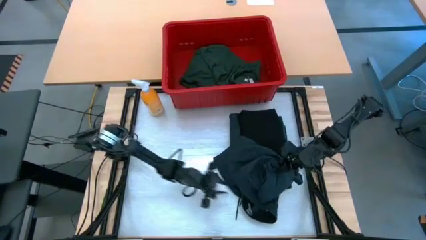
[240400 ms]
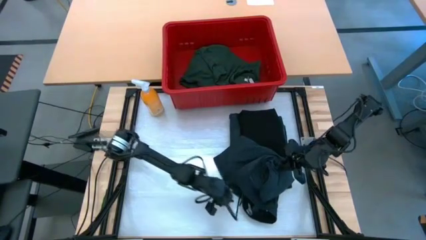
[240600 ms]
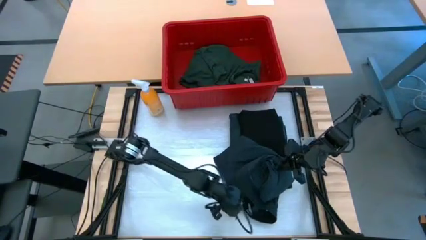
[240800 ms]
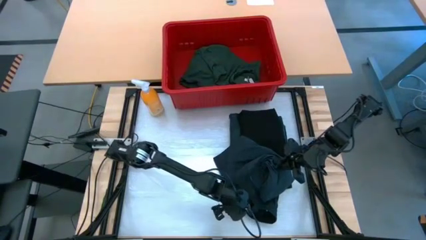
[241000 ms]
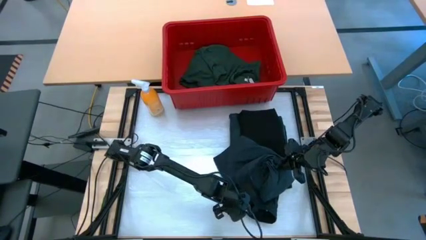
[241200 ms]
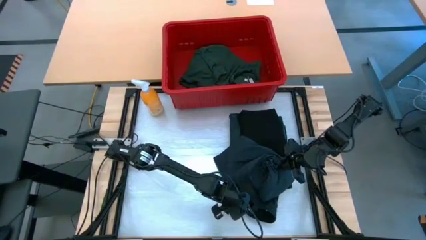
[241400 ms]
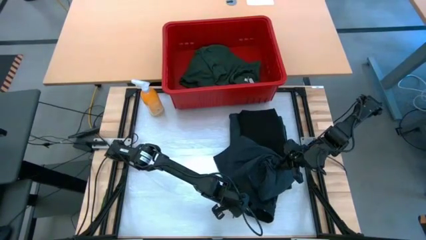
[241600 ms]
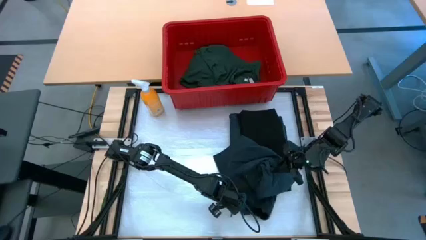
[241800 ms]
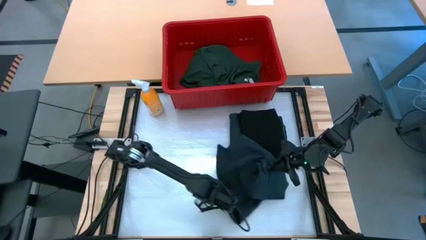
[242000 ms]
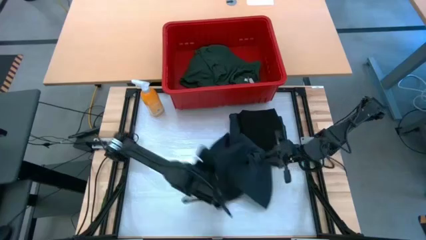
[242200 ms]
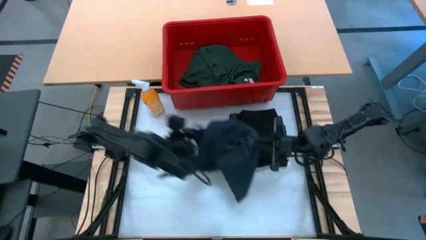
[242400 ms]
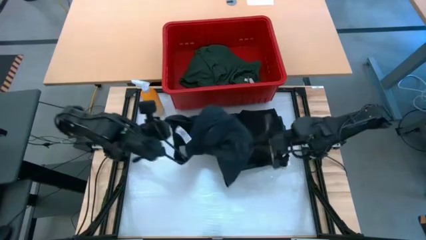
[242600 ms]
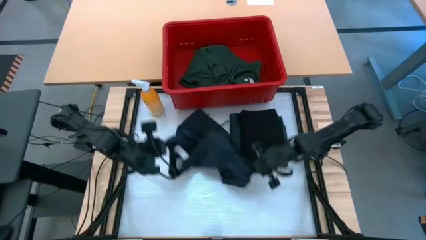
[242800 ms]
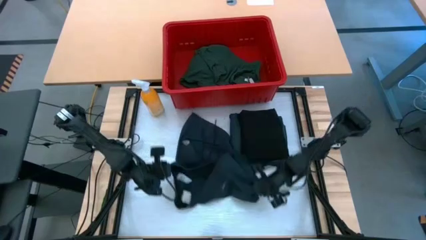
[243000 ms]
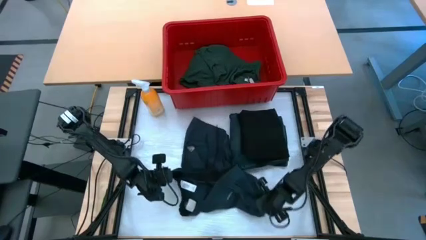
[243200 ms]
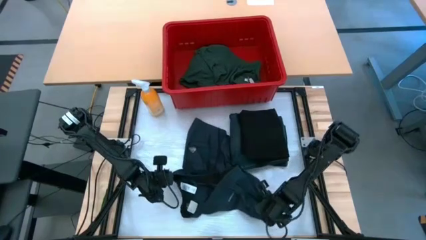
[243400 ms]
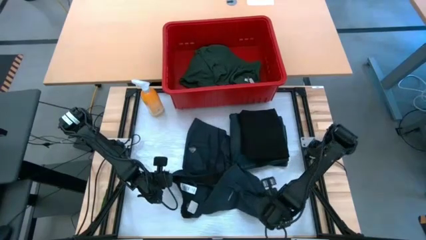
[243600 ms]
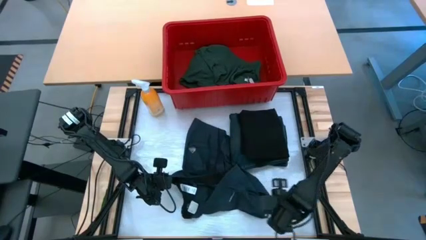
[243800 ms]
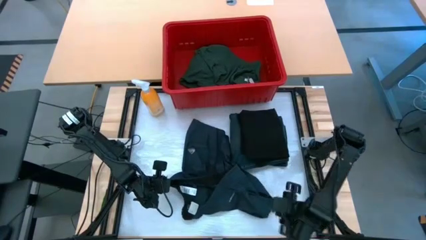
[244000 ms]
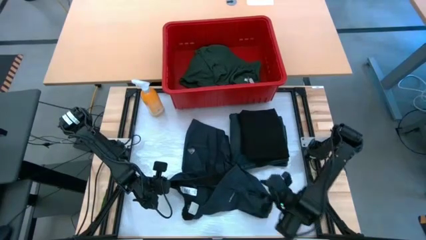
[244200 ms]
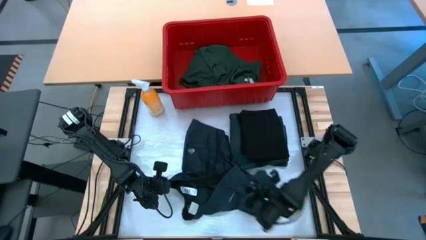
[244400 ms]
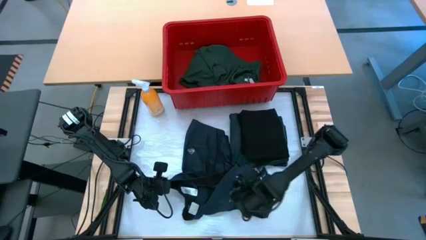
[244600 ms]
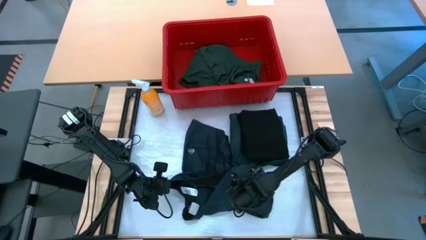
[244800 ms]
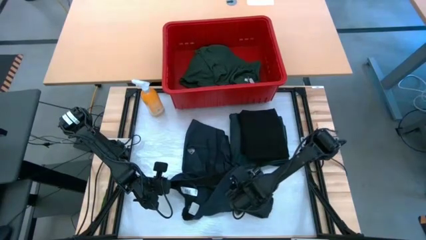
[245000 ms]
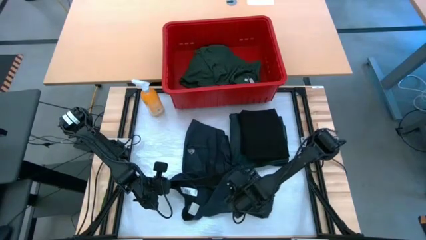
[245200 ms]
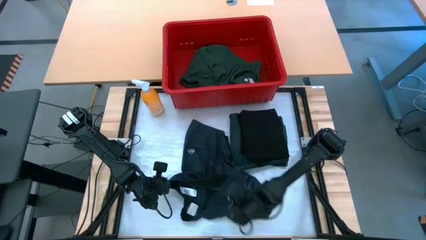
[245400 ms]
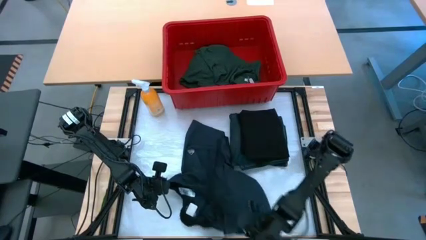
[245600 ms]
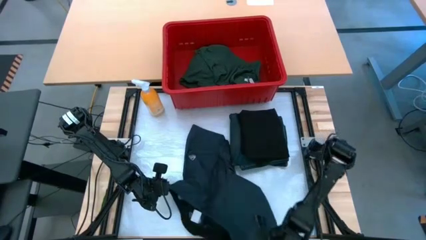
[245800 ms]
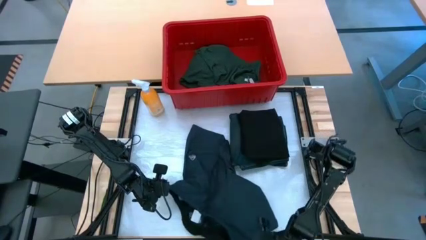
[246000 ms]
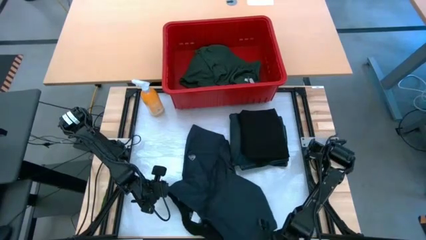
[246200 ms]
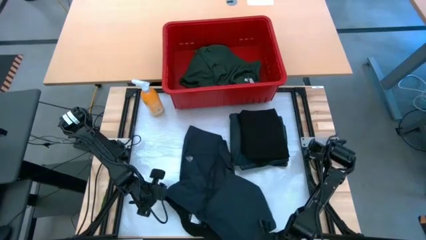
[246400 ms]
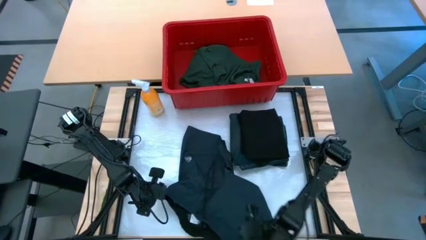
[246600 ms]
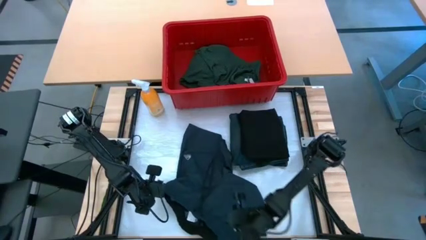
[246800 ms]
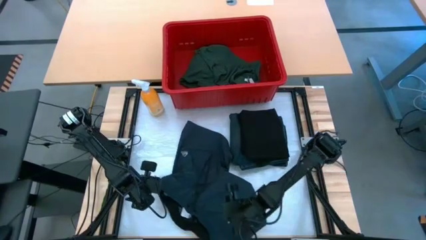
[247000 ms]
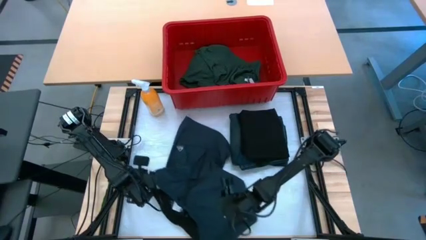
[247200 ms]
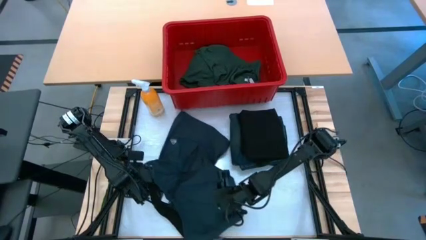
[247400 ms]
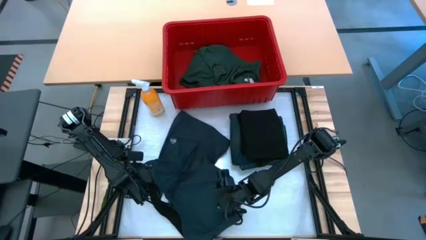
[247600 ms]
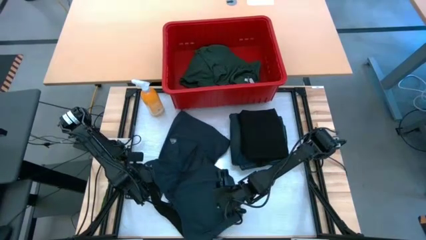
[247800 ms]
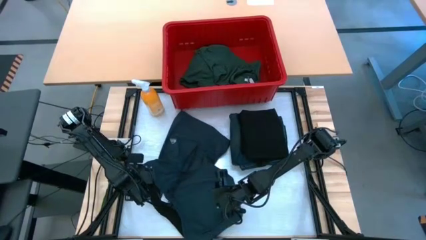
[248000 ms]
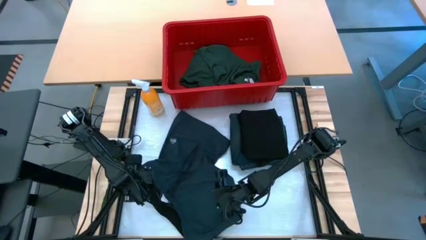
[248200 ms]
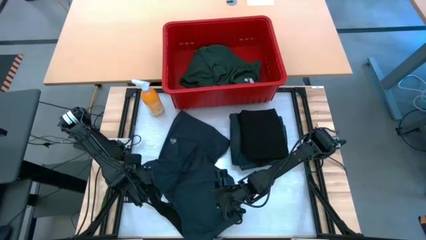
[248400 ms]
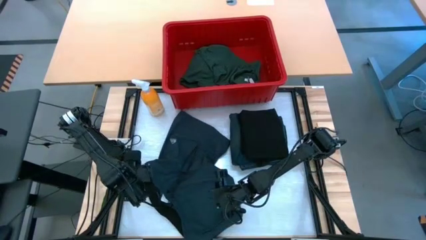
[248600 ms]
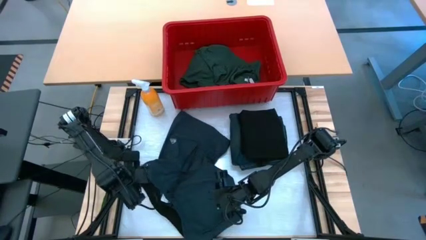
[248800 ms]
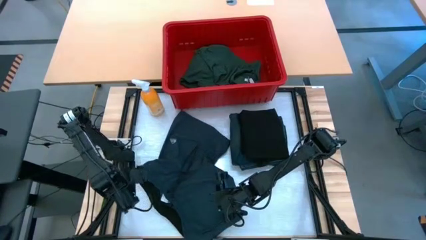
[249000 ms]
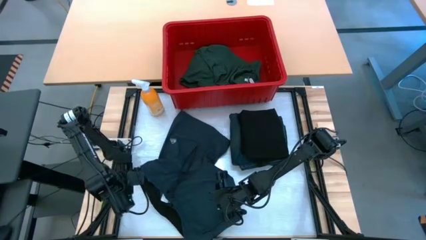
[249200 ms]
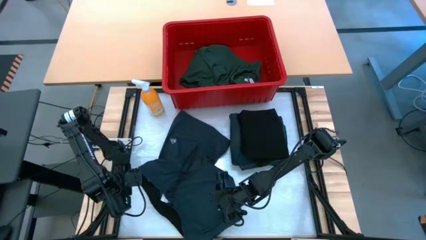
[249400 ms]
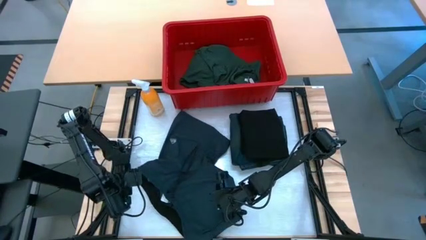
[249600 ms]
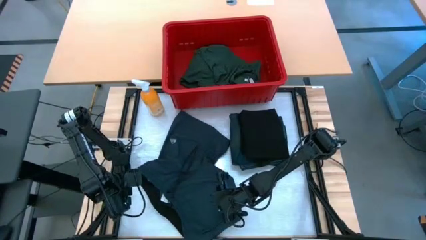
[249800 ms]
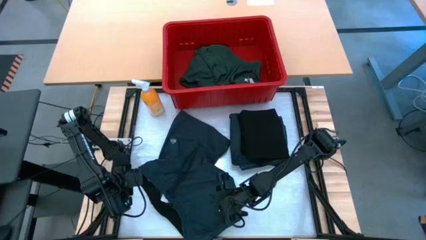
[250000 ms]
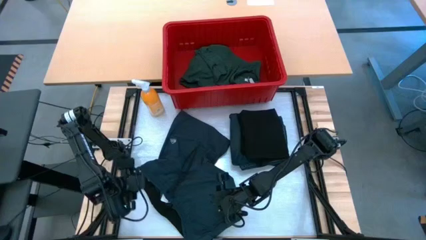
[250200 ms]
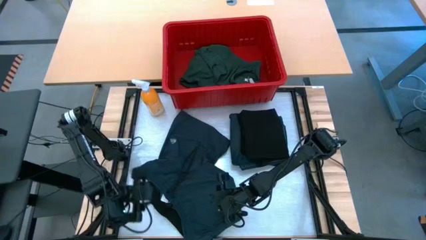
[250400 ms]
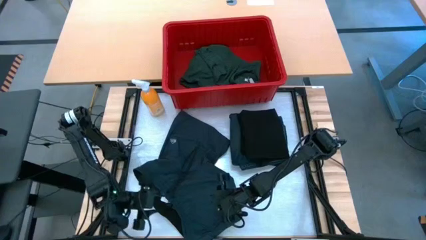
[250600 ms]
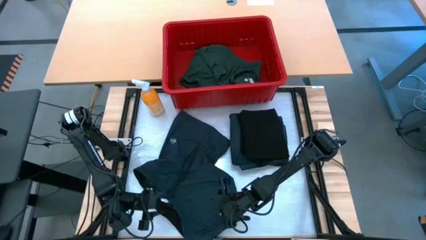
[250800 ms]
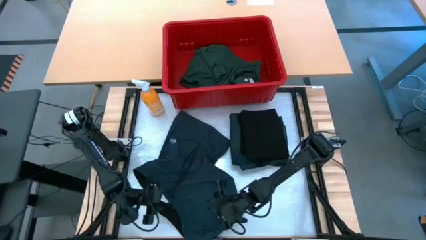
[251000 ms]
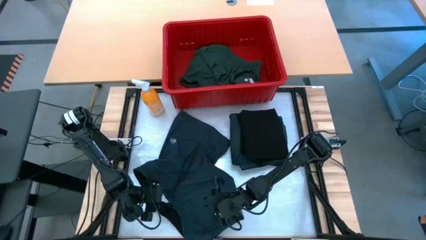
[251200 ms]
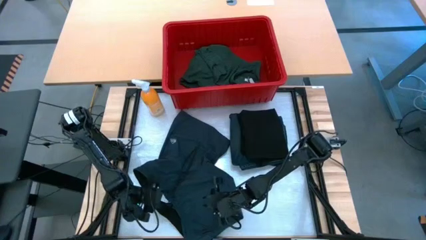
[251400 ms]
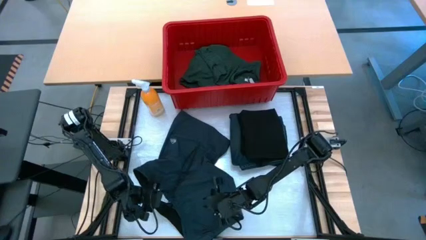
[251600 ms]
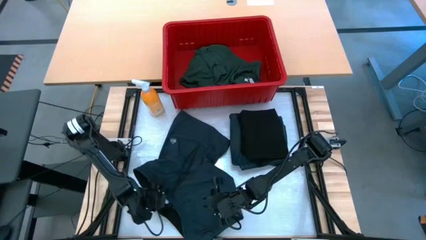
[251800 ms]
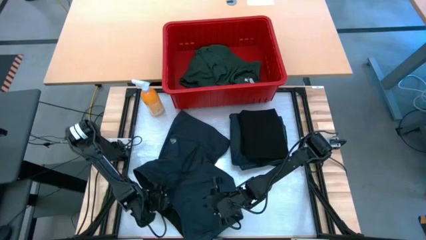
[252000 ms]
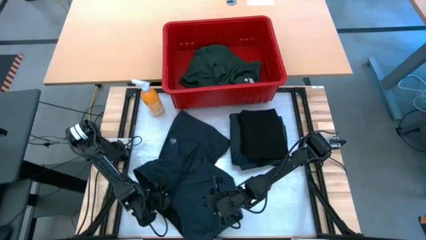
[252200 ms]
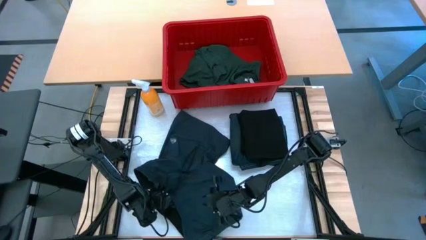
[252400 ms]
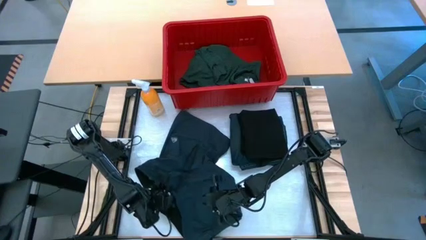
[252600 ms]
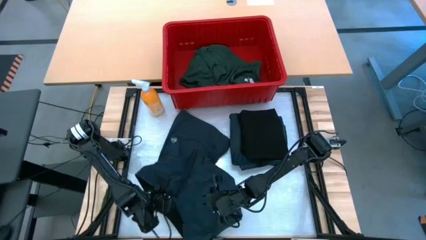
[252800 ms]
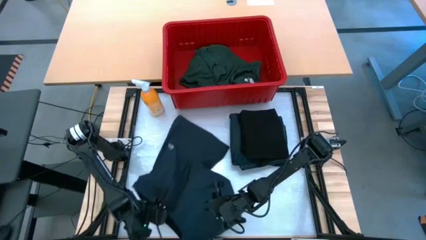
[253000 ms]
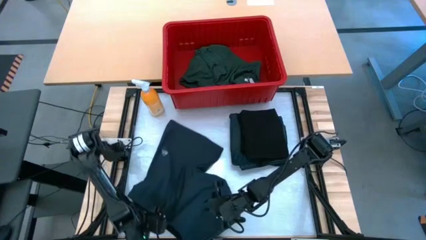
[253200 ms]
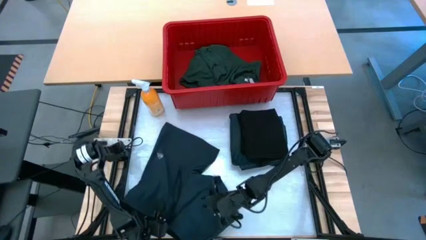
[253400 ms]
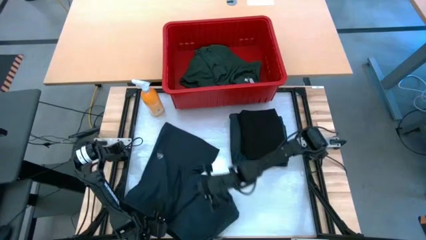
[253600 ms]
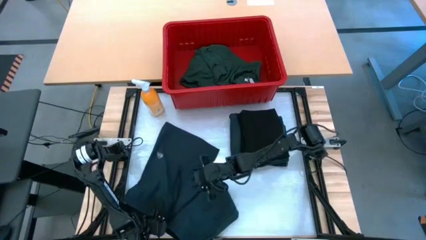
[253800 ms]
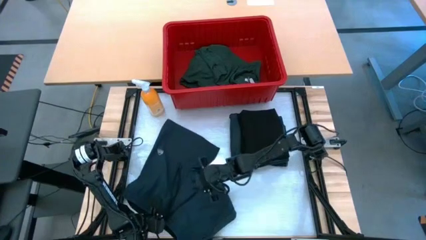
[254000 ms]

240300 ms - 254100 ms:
Task: Fold Laundry from Bin
Fold the black shorts
